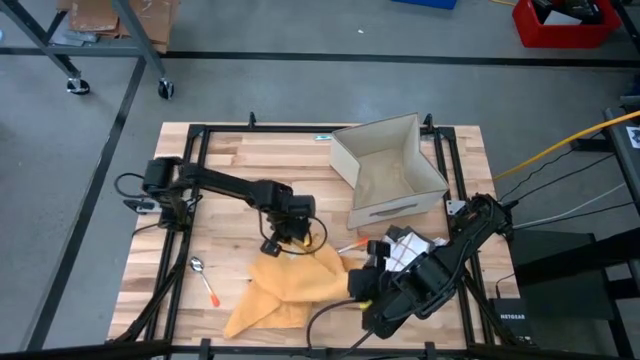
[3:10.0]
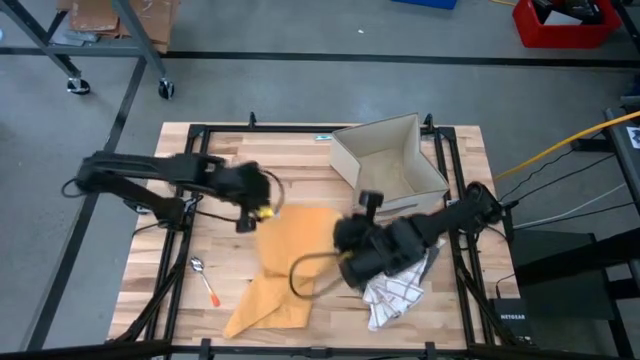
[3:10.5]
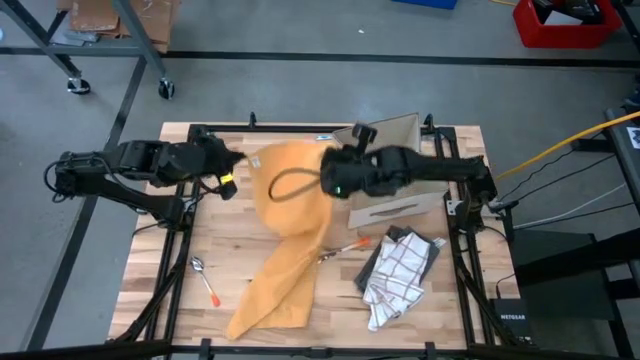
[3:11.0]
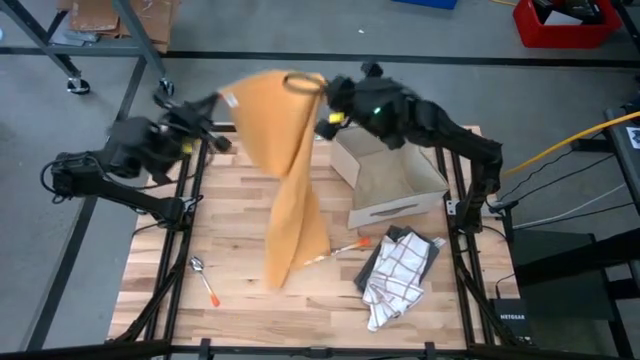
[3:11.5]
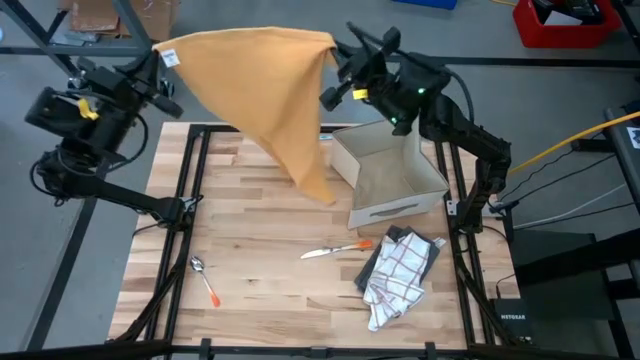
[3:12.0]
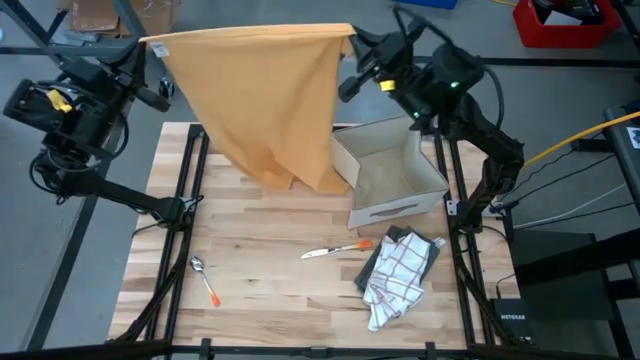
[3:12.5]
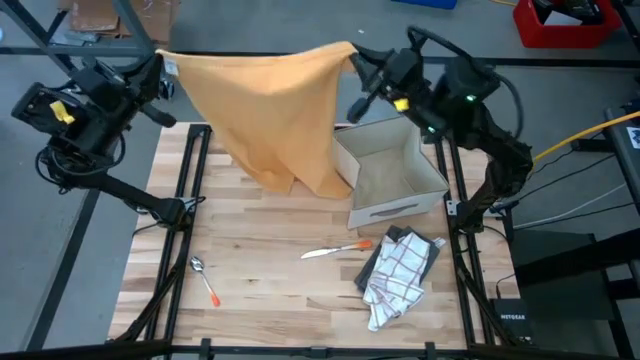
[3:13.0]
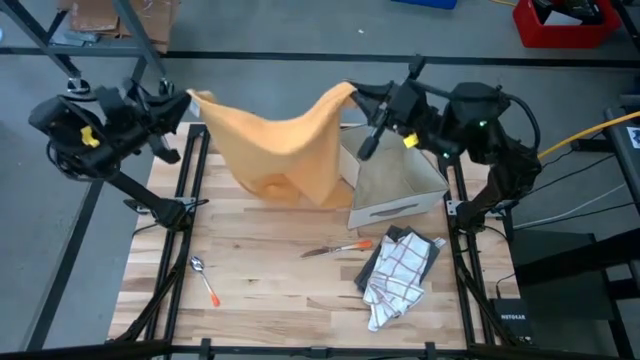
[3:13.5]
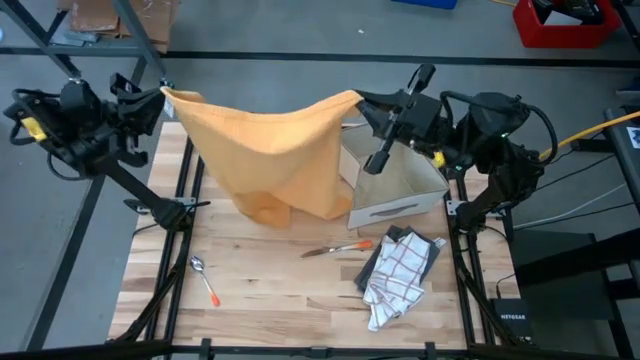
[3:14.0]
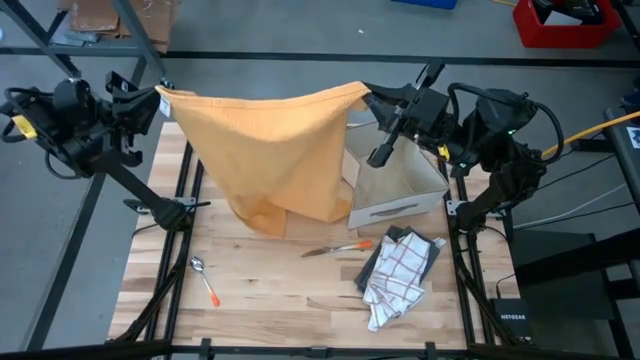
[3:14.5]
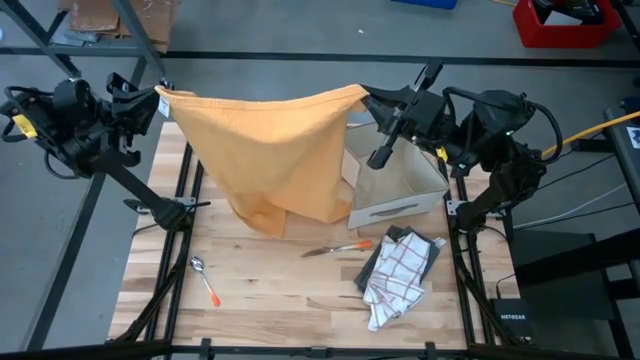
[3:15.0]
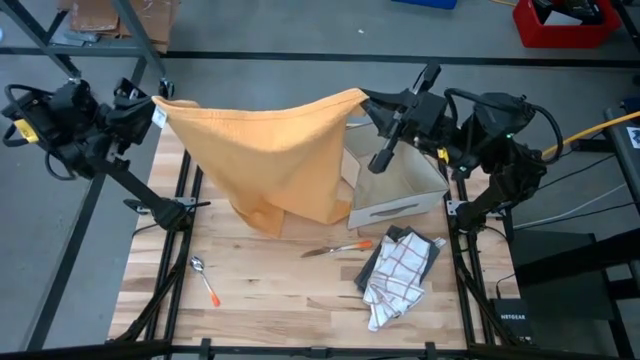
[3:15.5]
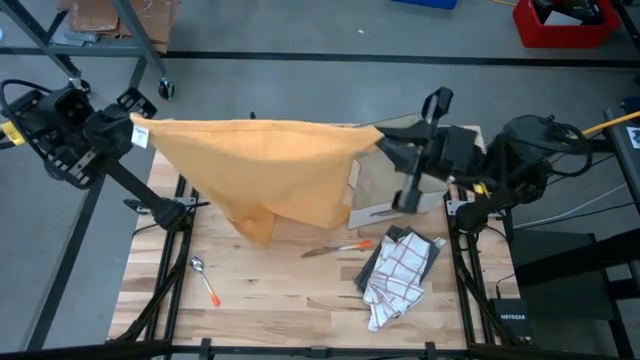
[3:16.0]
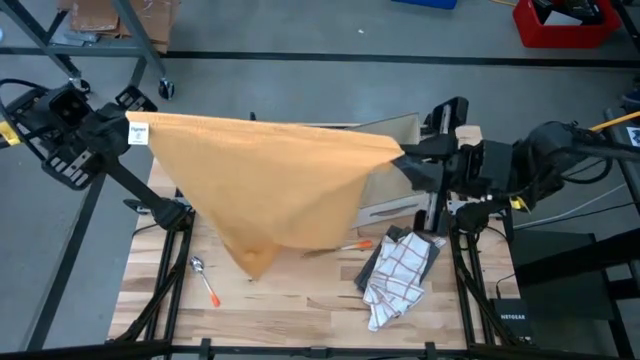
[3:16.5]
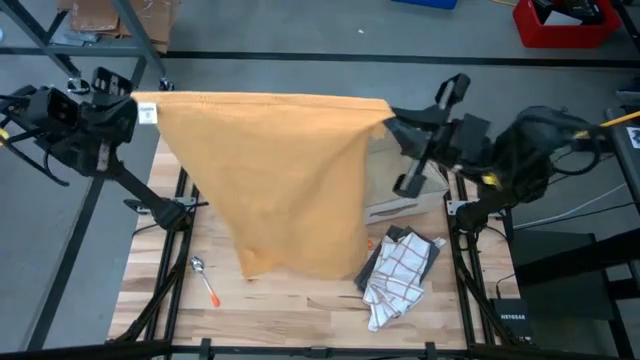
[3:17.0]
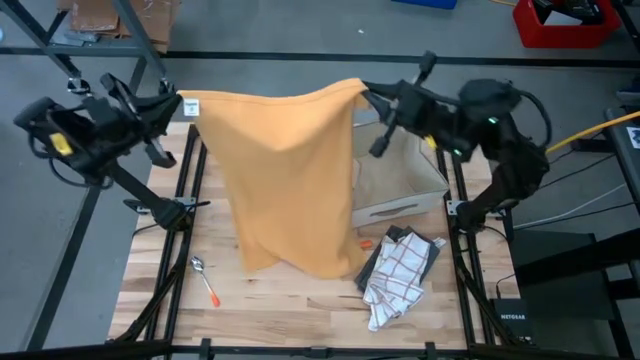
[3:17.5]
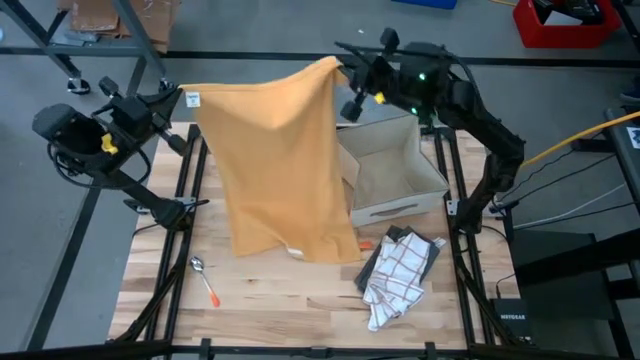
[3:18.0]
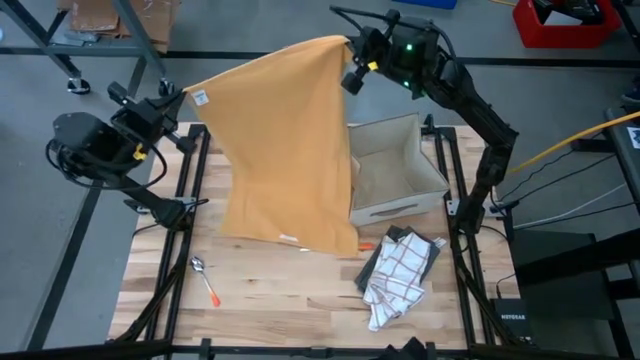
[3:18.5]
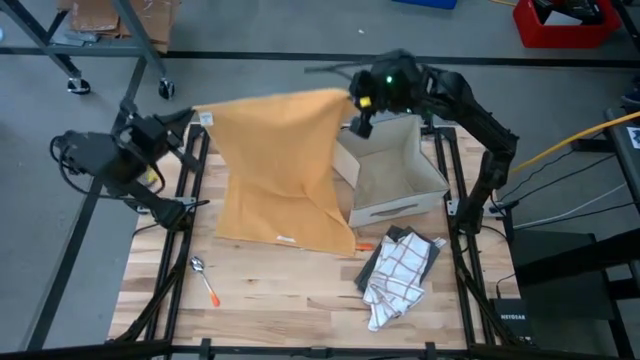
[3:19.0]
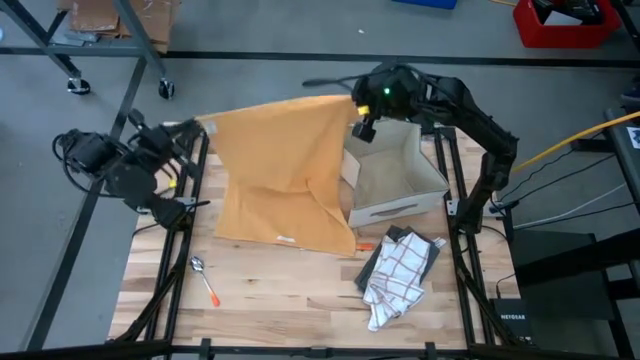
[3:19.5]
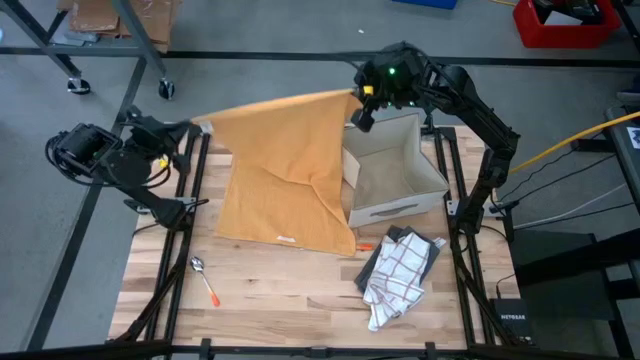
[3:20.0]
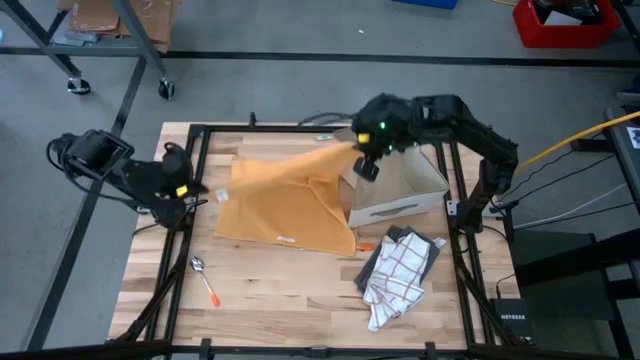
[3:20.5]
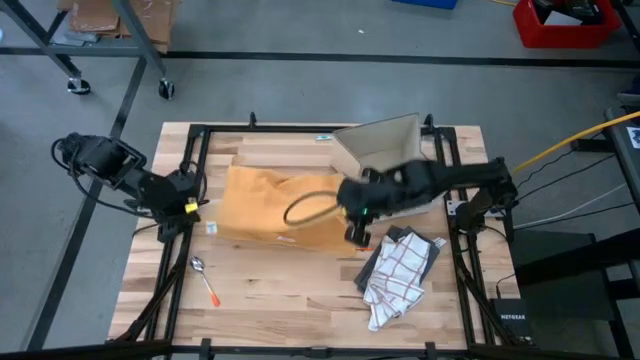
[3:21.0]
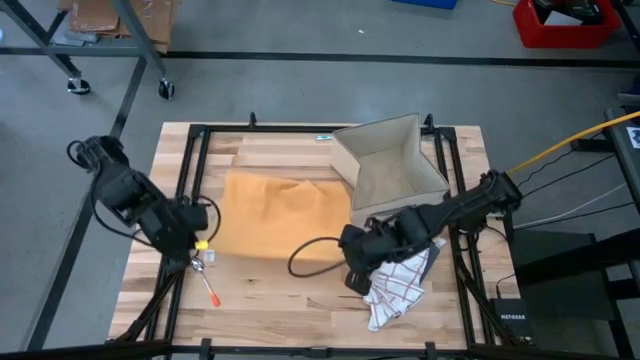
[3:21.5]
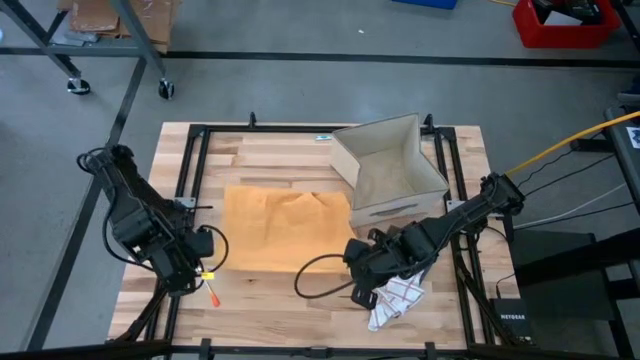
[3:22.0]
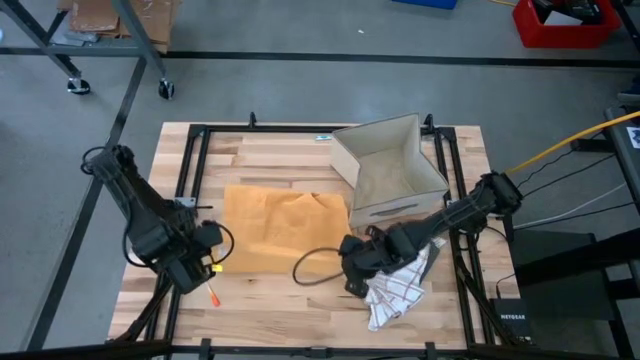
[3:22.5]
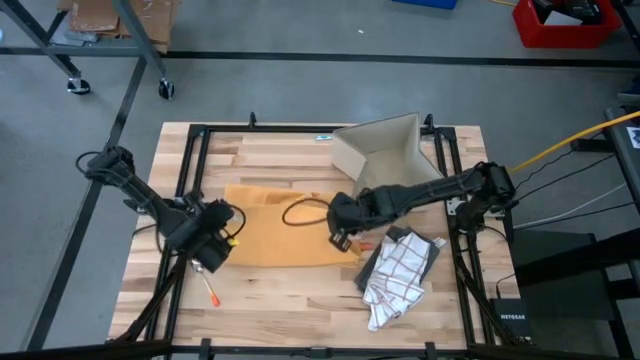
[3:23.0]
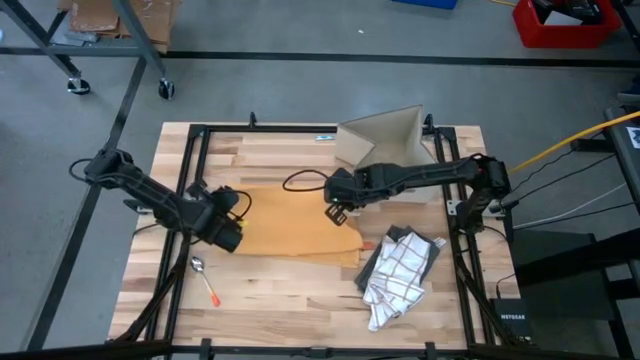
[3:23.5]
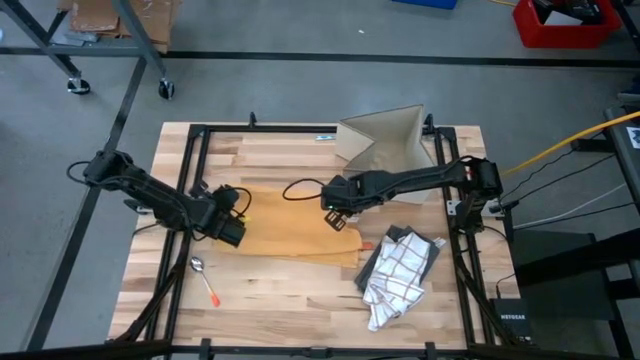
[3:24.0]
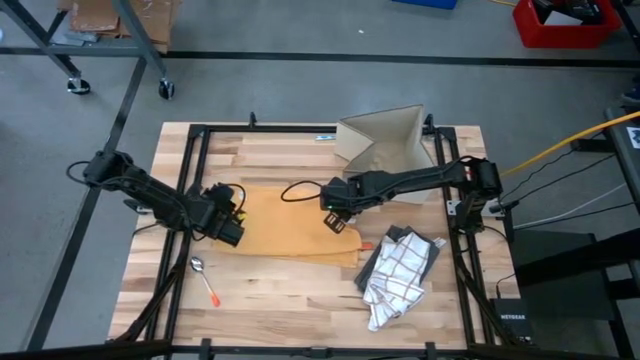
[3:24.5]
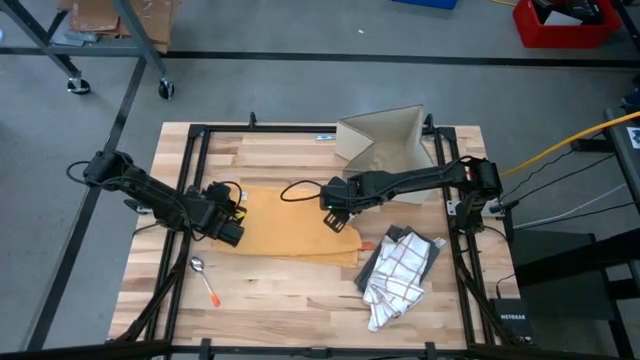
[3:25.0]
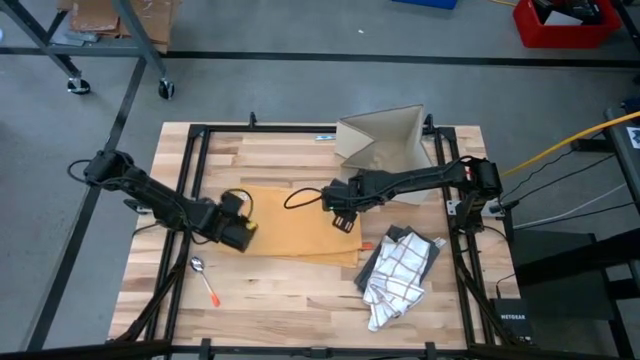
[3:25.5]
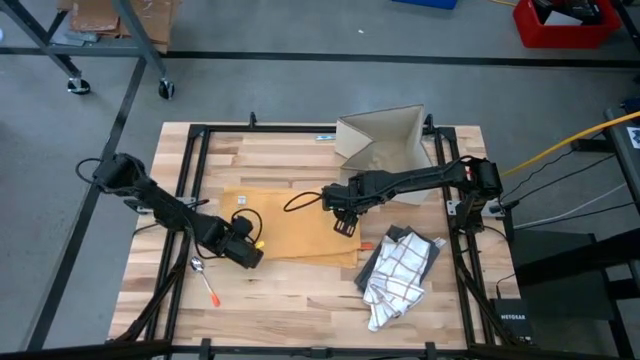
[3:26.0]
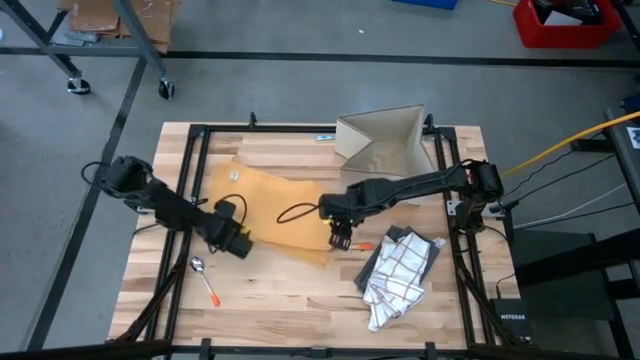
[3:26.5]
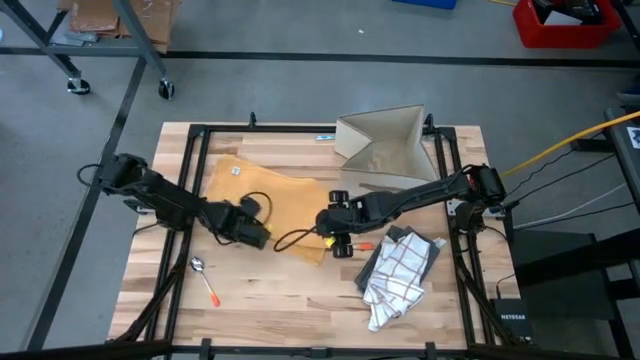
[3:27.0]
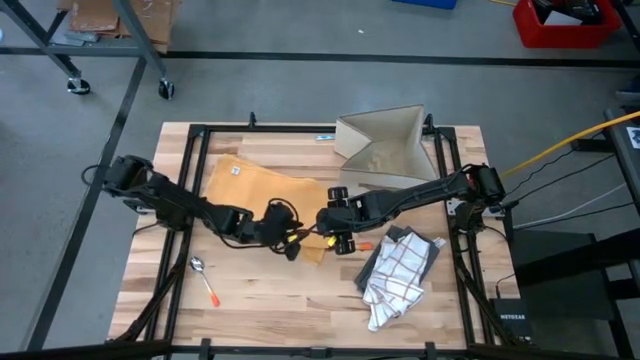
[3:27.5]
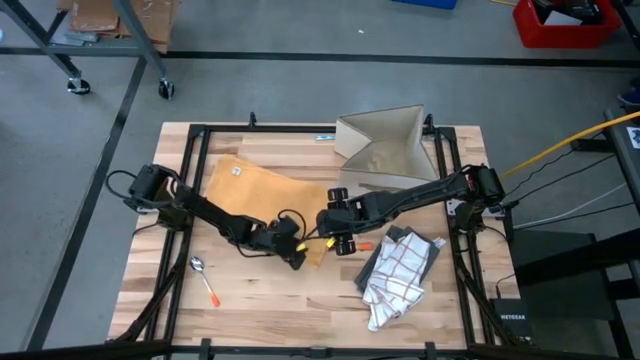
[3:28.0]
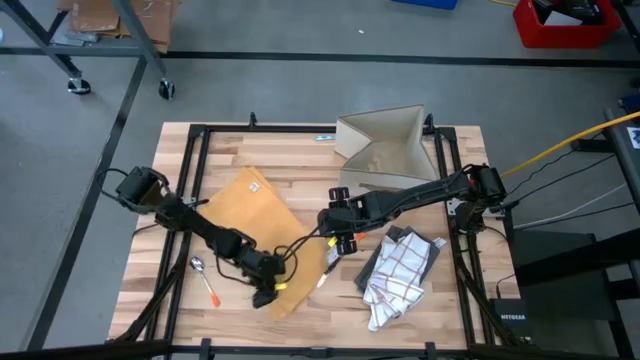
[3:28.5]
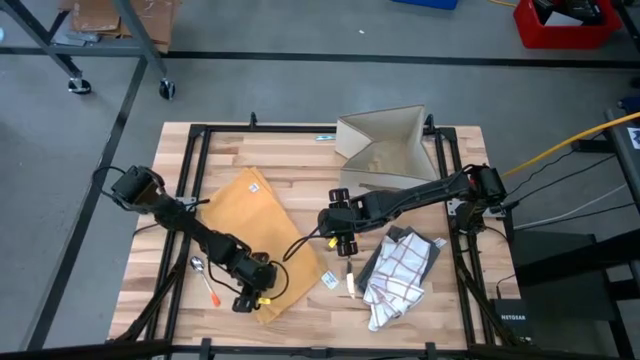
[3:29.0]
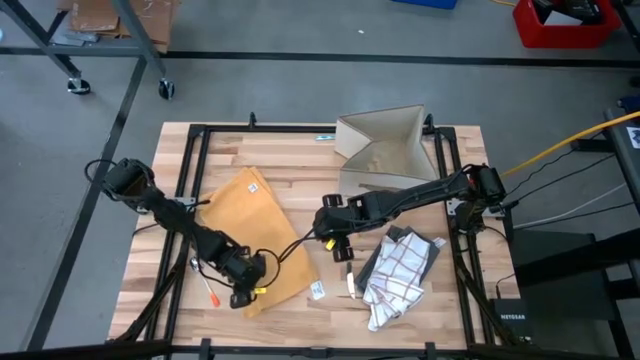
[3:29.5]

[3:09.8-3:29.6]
Task: Fold towel
Fold the orange kitchen towel
